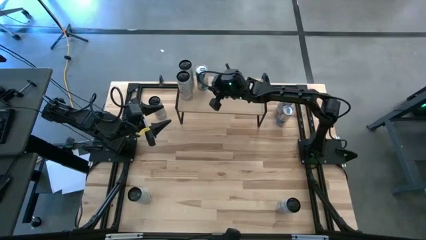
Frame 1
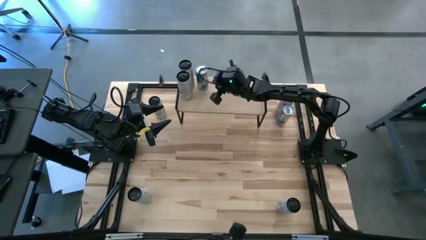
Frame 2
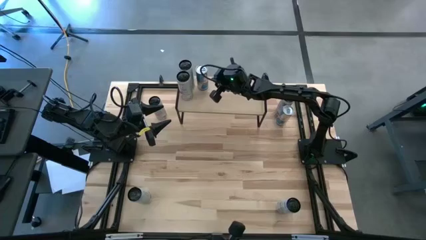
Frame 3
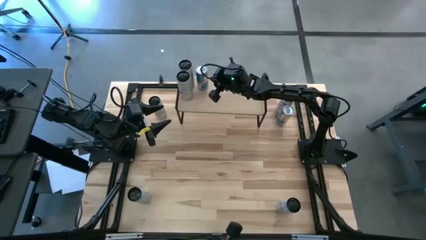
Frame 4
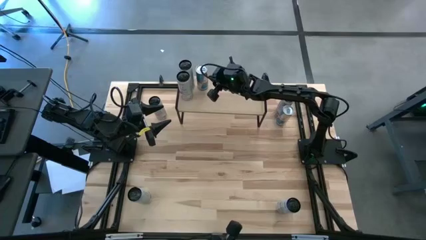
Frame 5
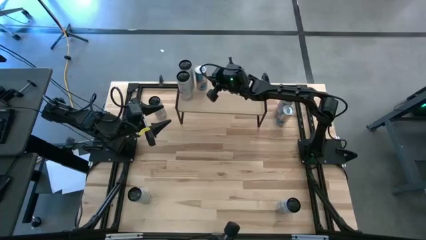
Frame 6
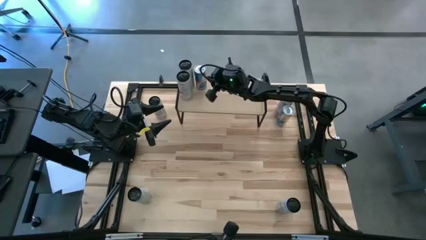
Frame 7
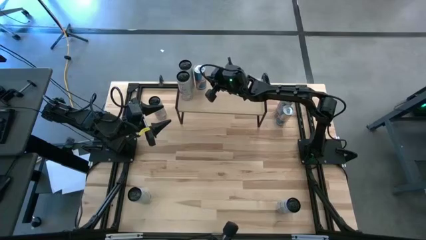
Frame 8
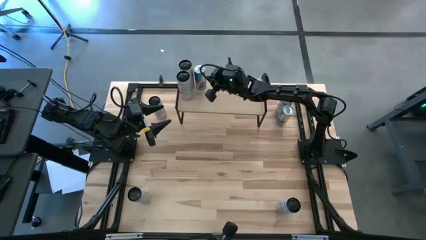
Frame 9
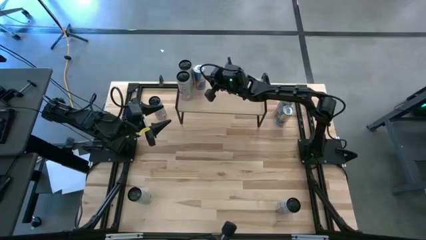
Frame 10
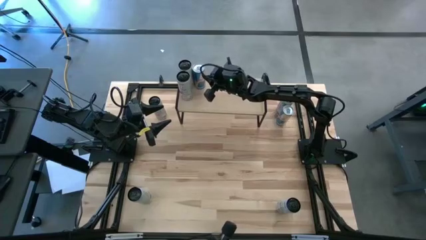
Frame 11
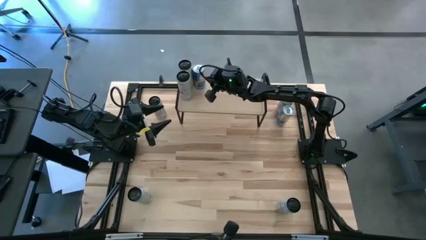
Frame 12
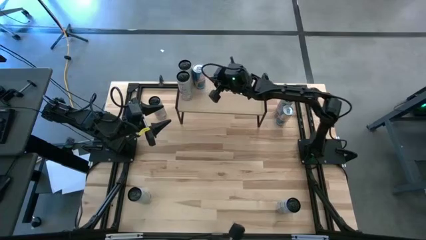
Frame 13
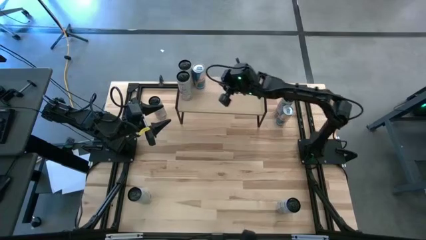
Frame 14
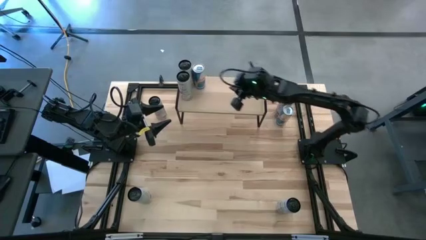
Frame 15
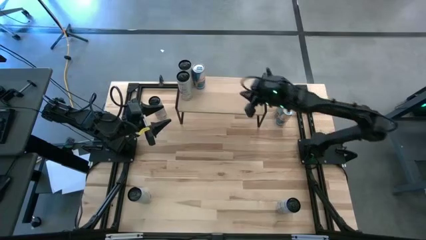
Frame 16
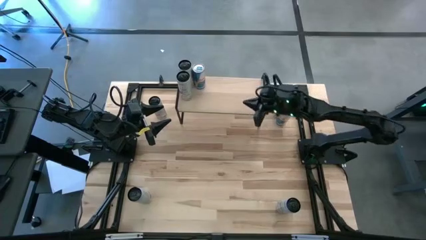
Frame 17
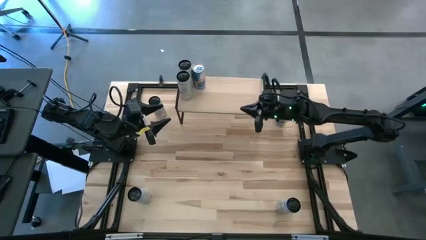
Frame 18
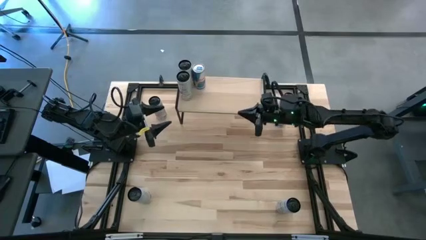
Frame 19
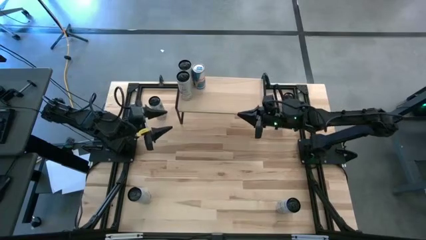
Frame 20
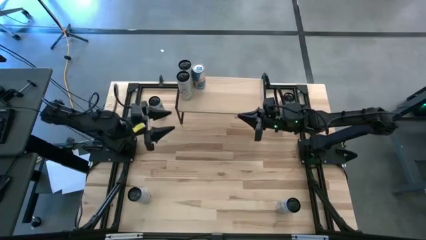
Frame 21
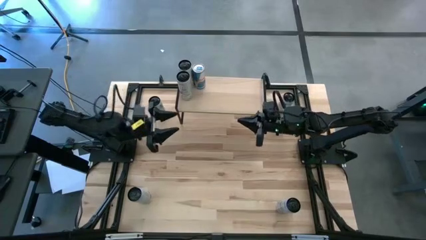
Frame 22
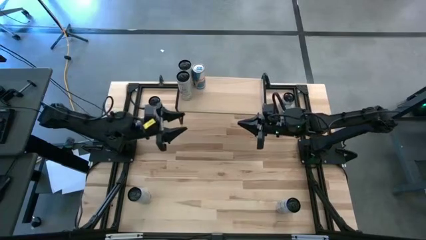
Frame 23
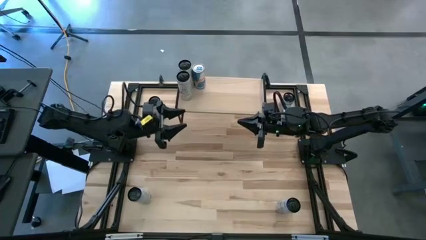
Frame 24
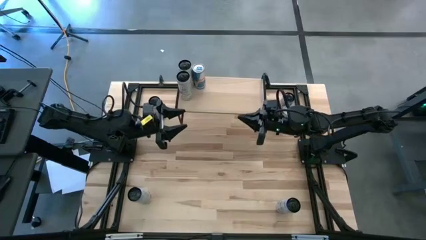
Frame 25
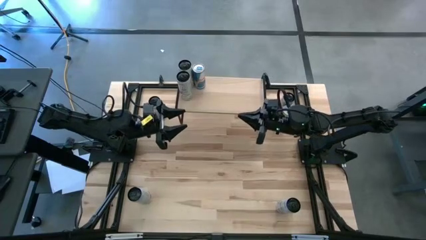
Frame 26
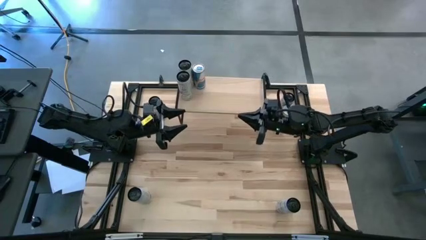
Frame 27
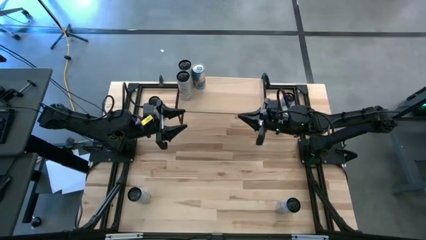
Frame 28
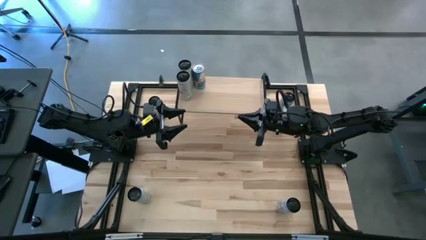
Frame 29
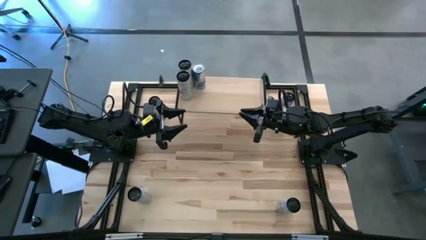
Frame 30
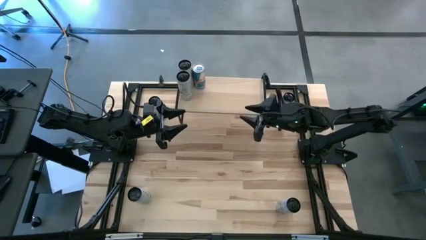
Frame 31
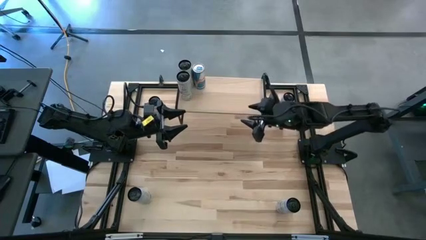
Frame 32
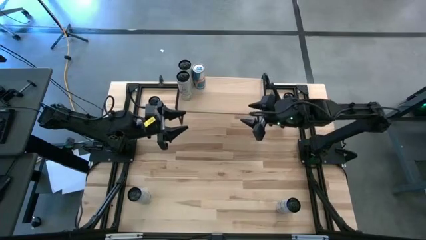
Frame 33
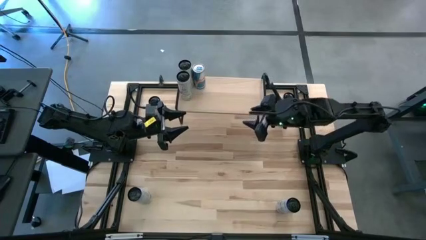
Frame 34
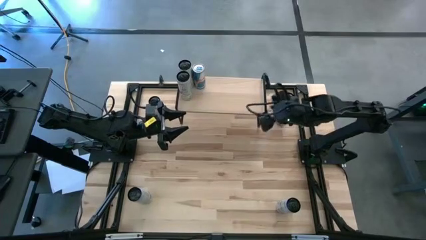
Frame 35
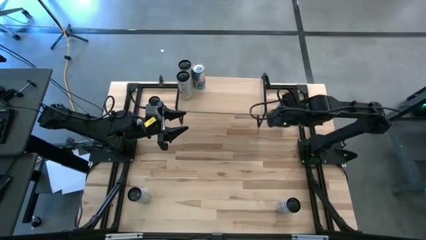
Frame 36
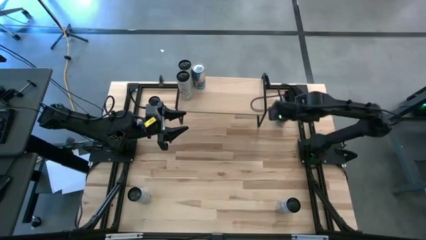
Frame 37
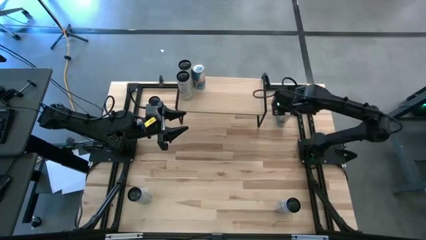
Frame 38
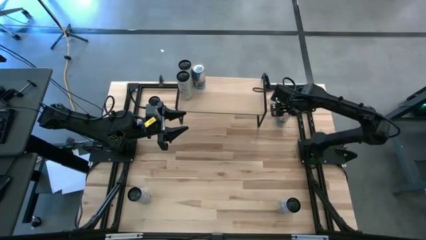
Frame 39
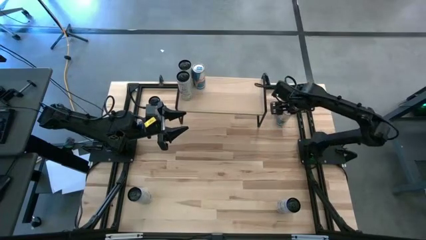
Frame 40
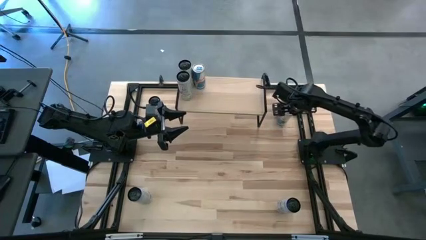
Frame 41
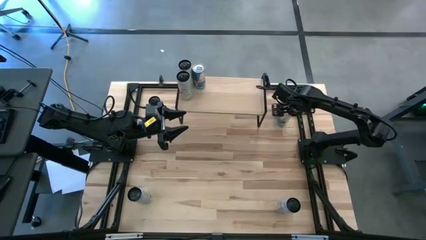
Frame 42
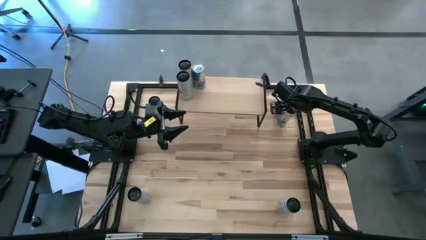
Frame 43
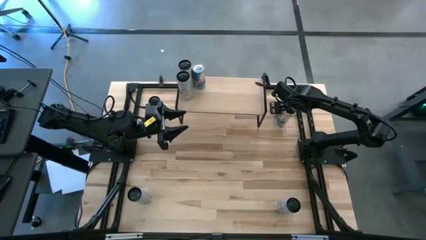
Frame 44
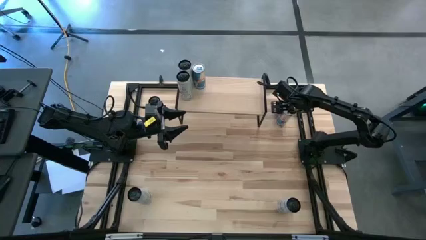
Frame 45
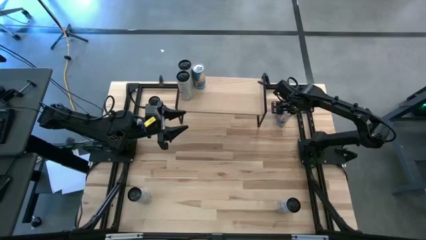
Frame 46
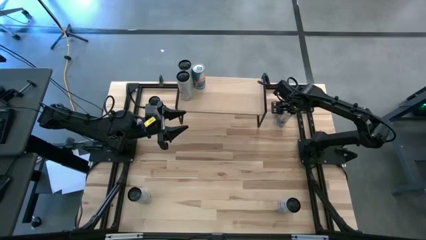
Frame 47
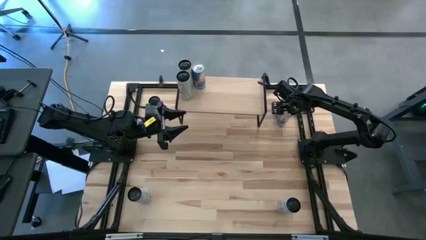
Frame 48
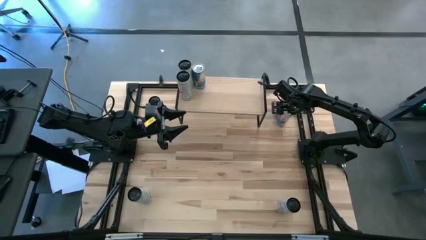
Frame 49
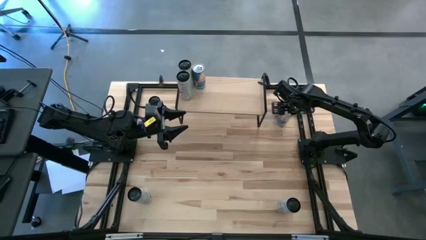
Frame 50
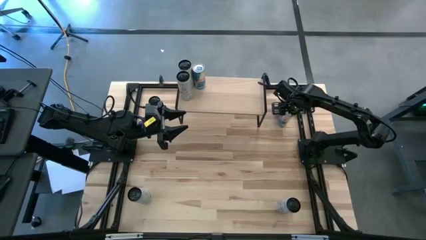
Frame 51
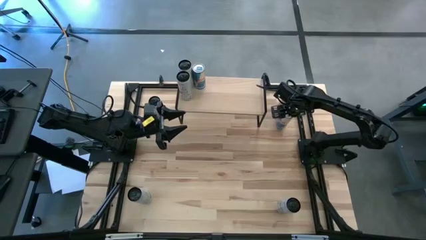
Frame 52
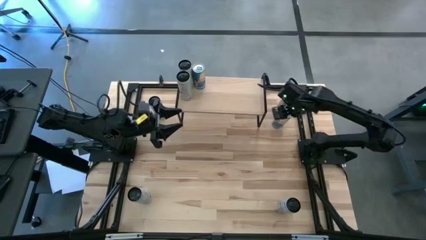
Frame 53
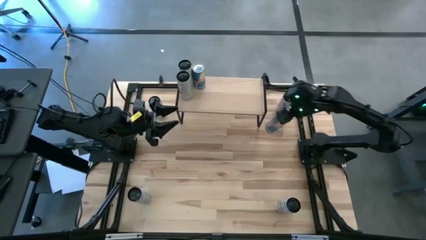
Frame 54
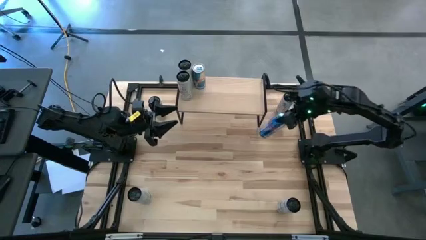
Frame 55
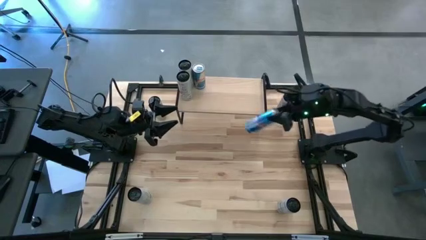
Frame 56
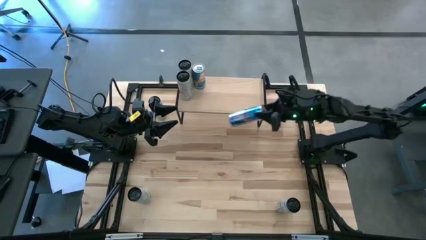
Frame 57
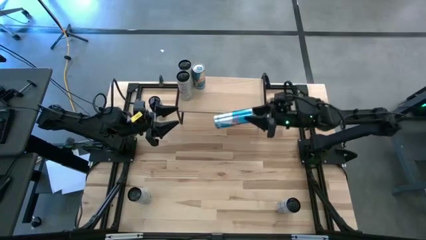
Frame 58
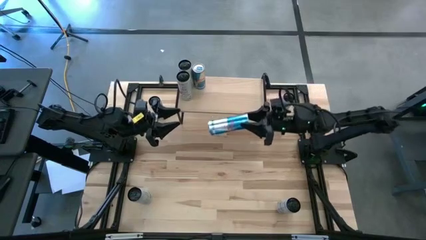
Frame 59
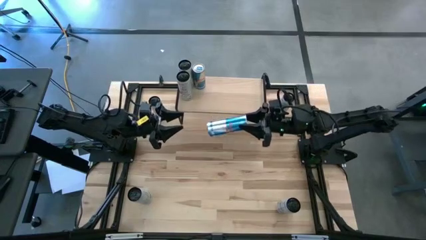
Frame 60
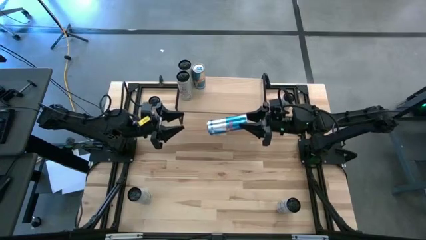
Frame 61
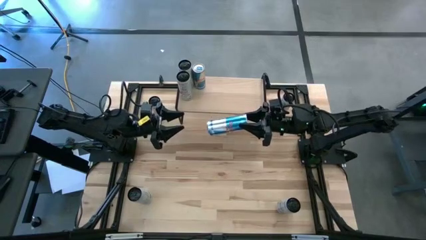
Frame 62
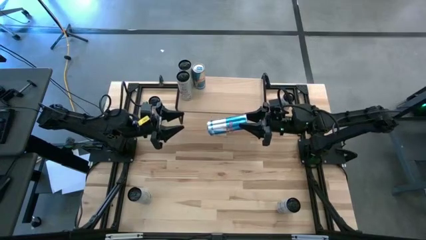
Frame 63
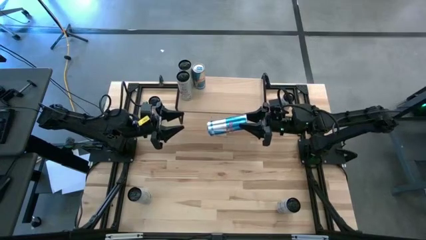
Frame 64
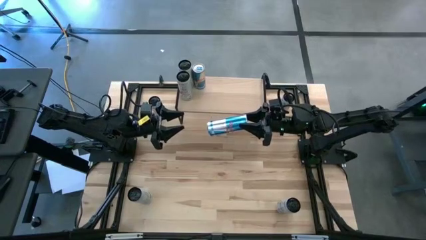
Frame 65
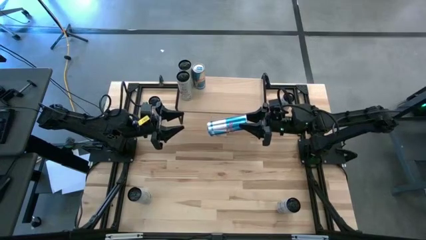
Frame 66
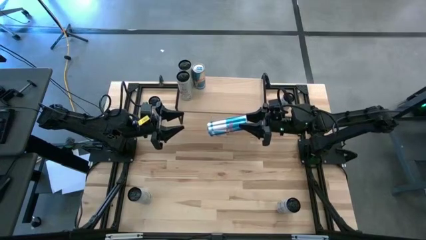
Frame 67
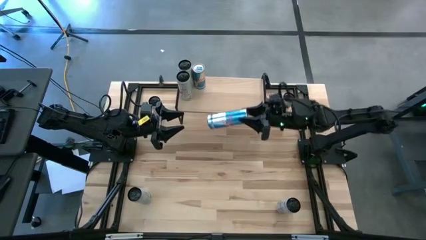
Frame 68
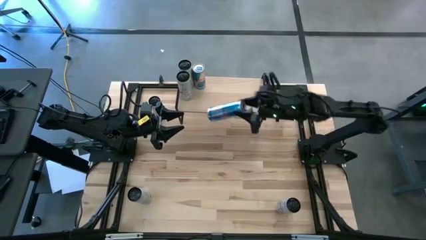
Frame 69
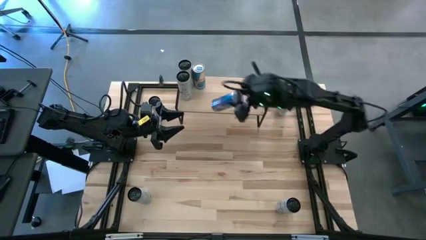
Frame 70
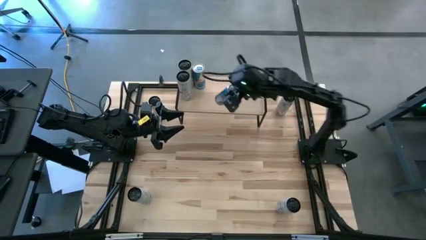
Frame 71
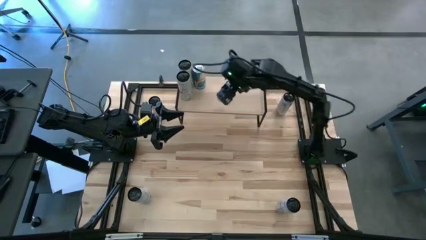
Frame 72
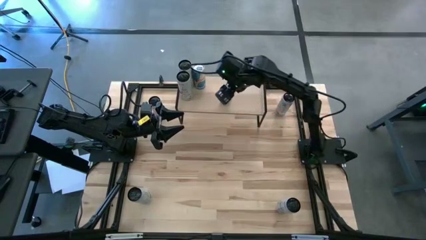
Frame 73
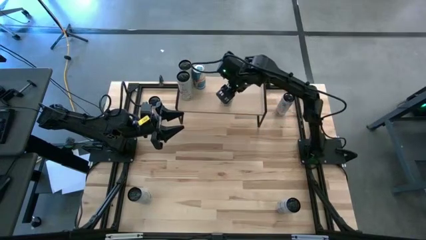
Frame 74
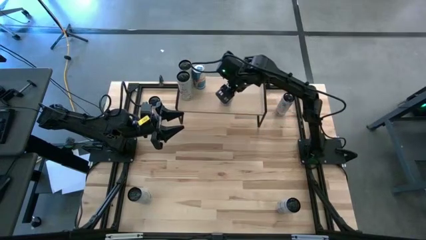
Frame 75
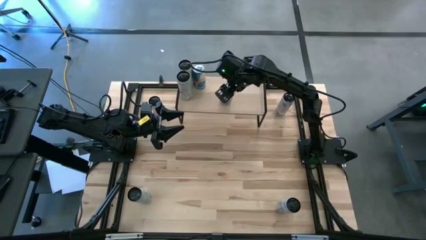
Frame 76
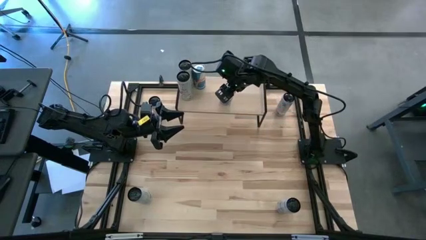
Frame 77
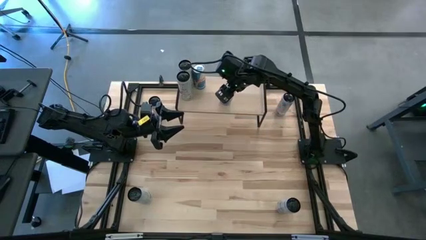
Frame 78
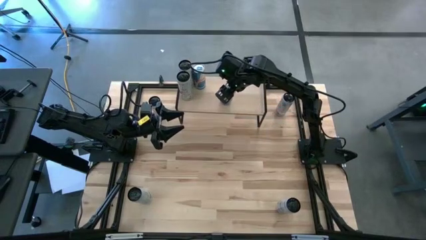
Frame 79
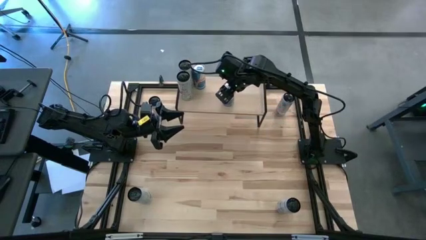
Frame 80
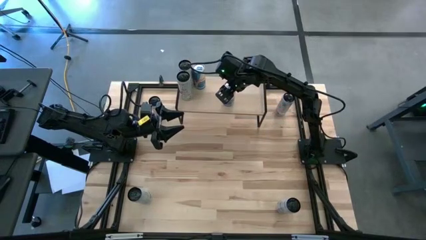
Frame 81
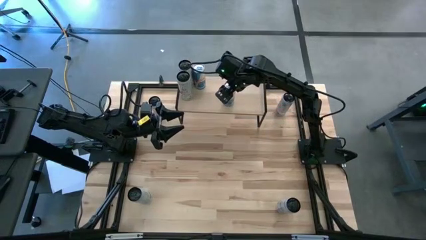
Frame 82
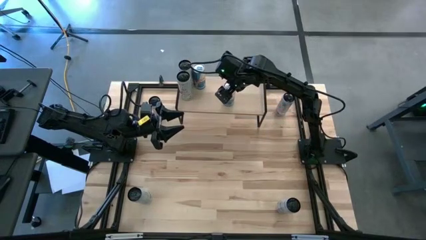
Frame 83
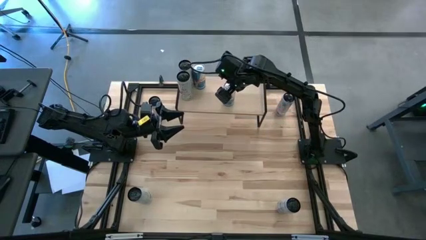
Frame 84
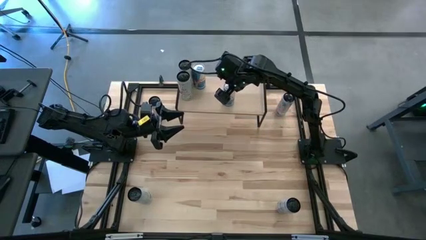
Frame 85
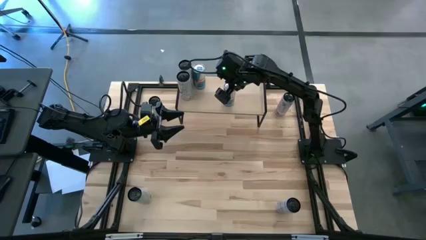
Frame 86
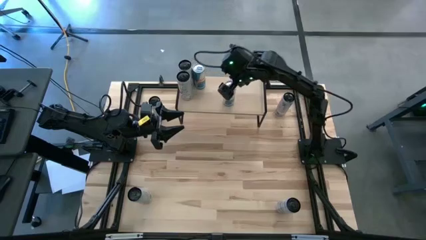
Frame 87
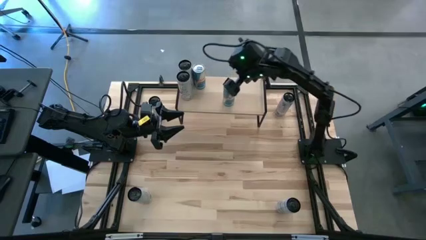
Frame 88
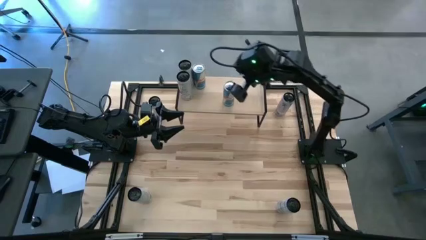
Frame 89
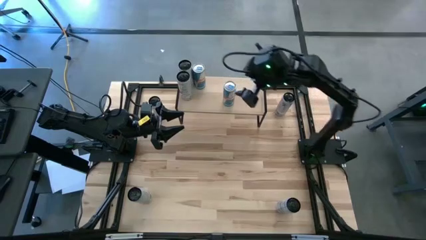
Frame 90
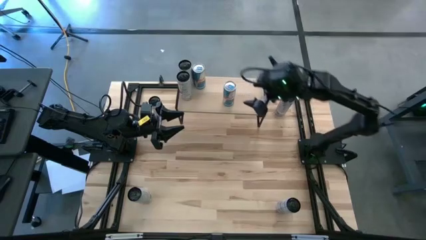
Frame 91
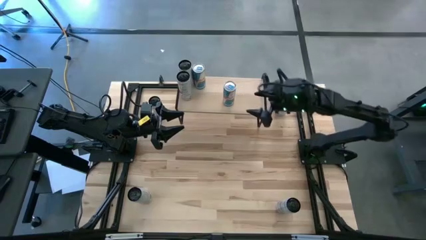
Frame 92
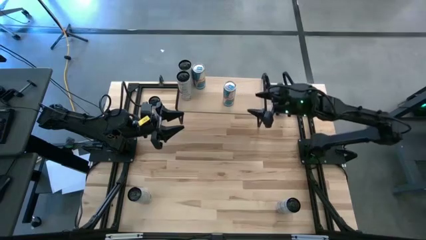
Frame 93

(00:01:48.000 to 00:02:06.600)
Task: Place canned beverage on shelf
Put the blue soda can on the shelf
